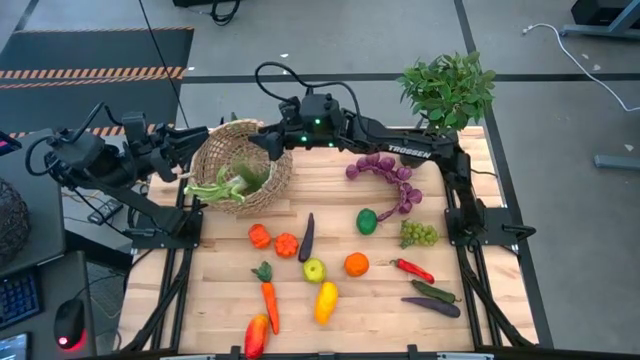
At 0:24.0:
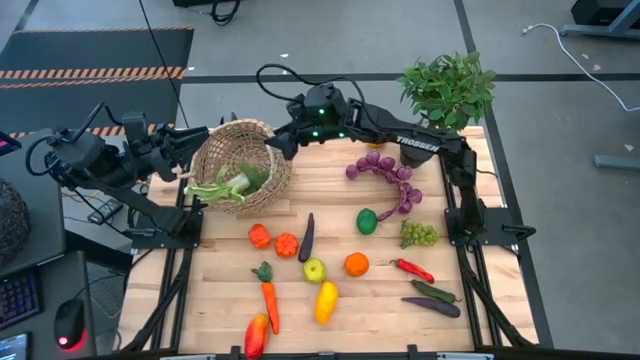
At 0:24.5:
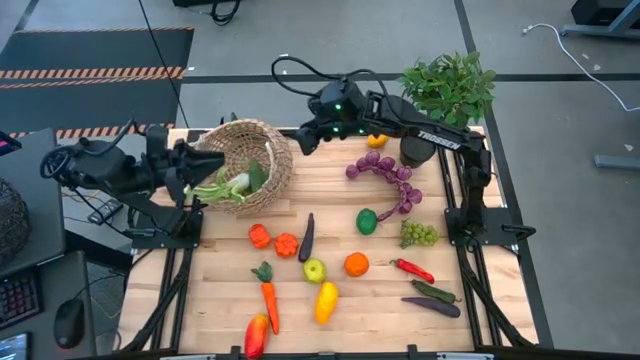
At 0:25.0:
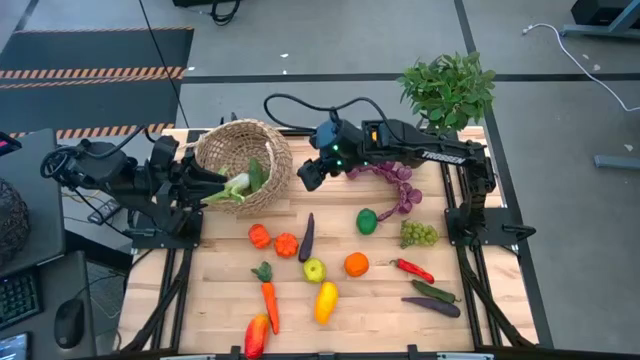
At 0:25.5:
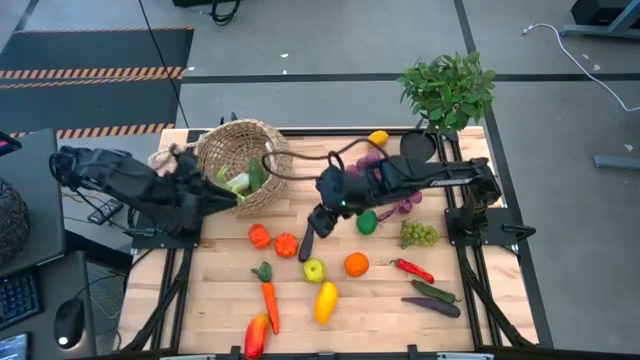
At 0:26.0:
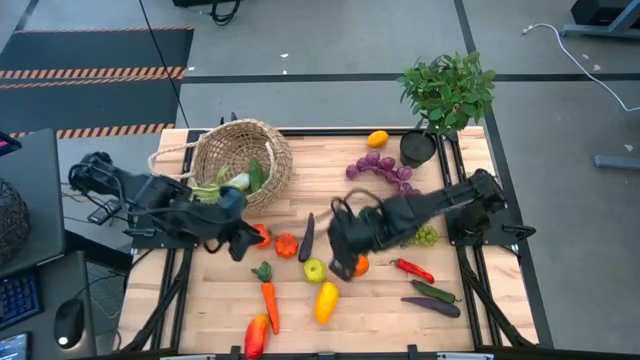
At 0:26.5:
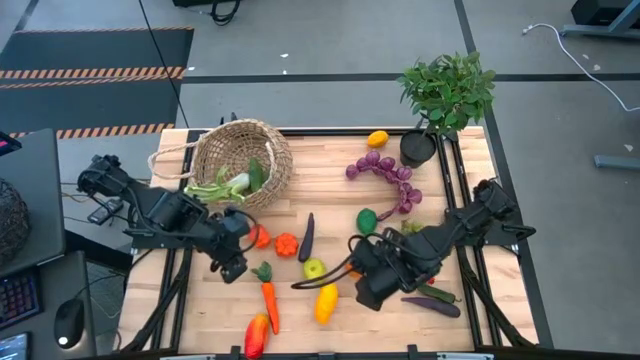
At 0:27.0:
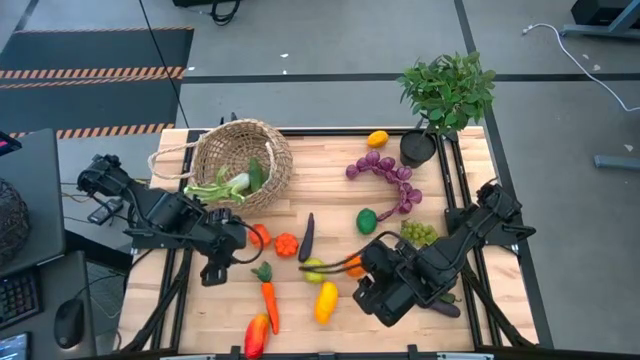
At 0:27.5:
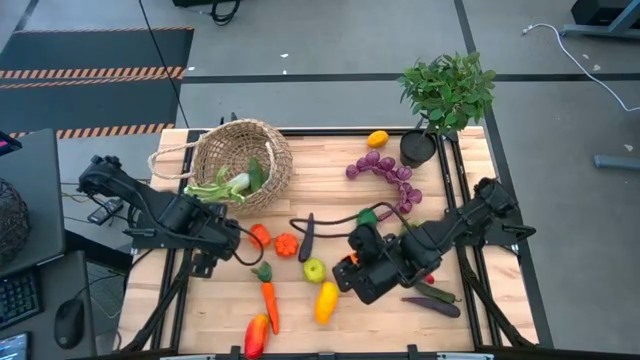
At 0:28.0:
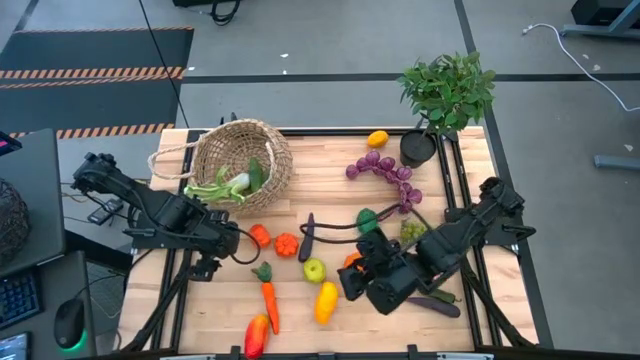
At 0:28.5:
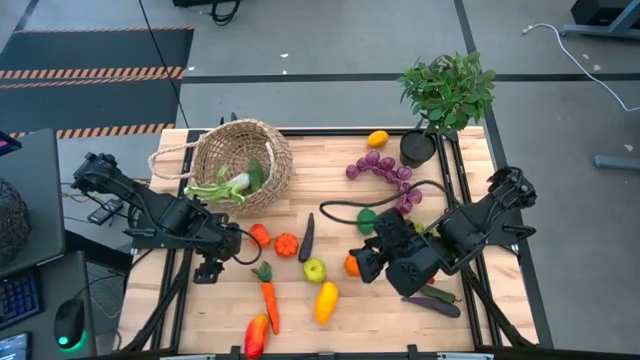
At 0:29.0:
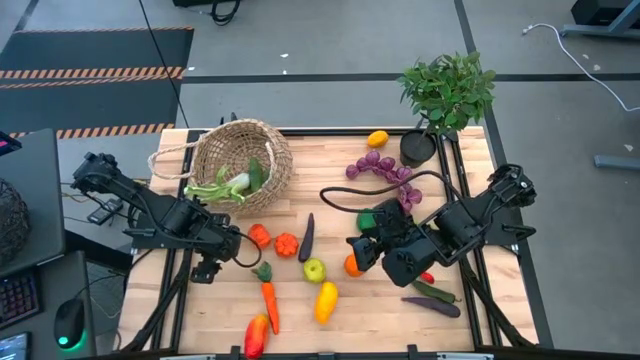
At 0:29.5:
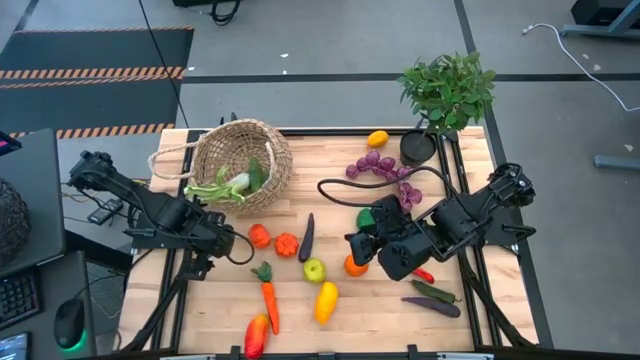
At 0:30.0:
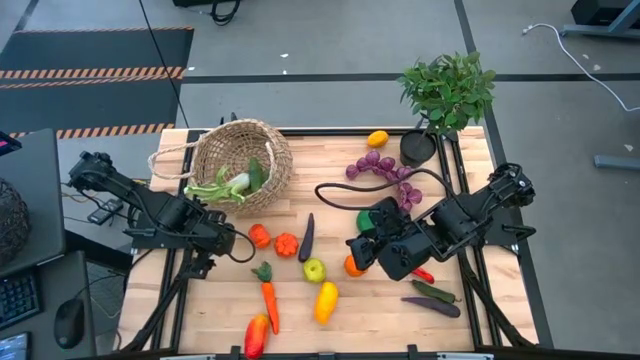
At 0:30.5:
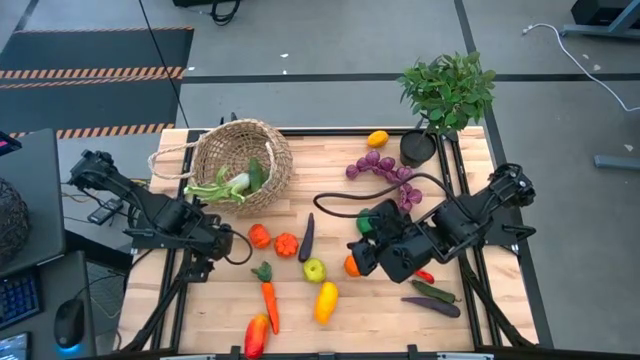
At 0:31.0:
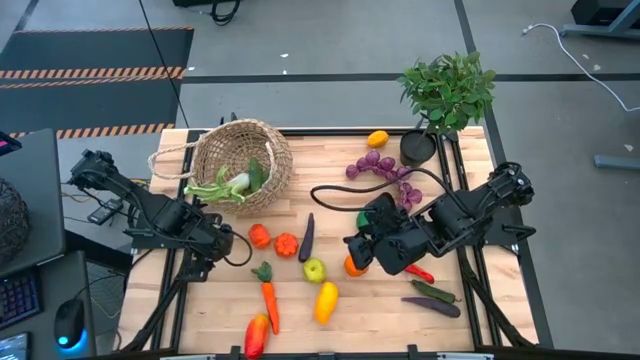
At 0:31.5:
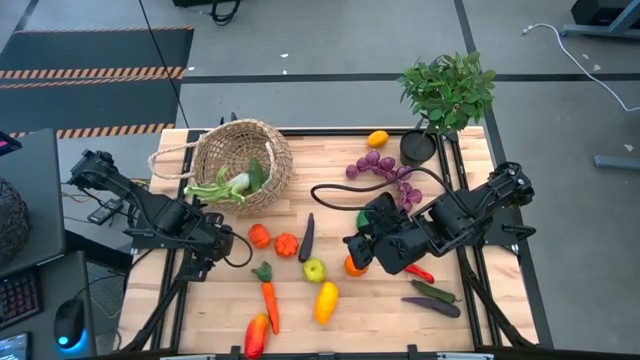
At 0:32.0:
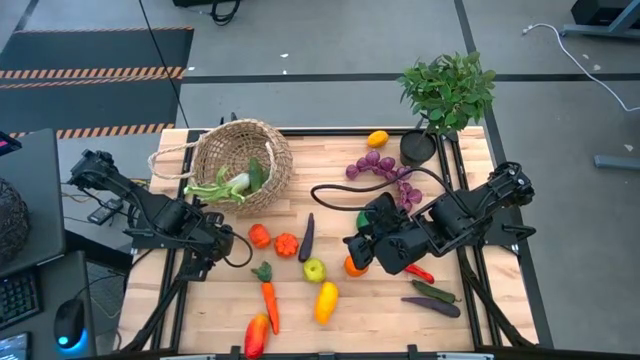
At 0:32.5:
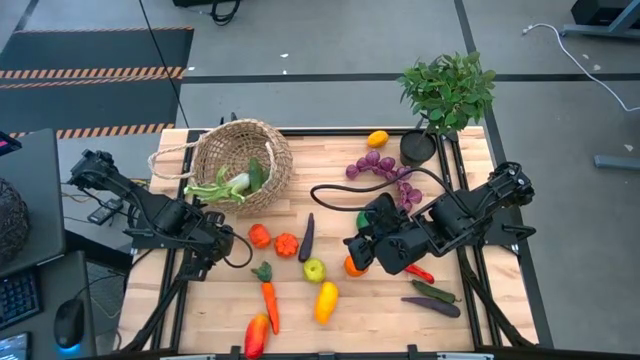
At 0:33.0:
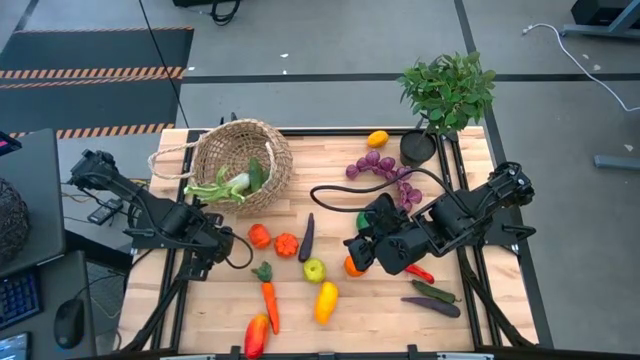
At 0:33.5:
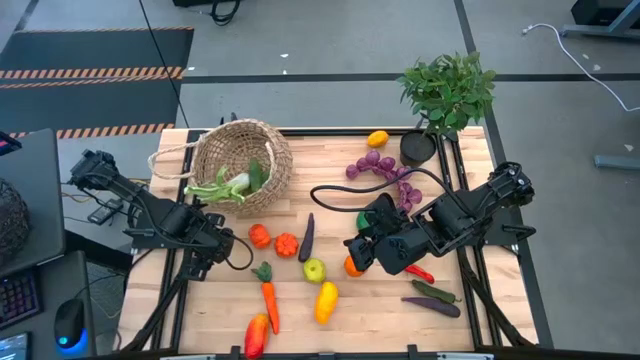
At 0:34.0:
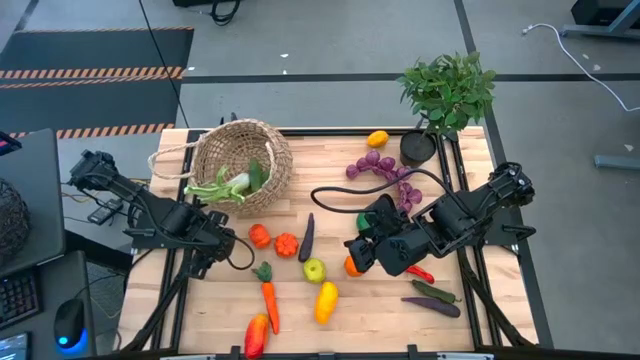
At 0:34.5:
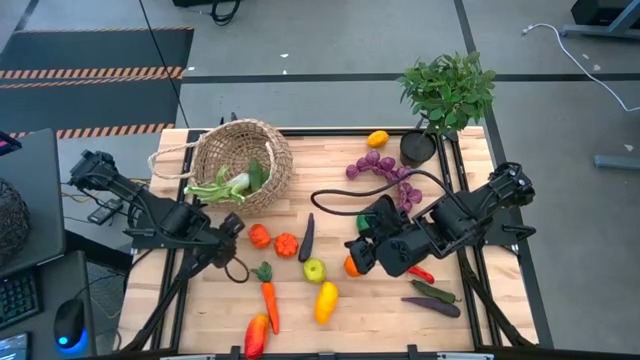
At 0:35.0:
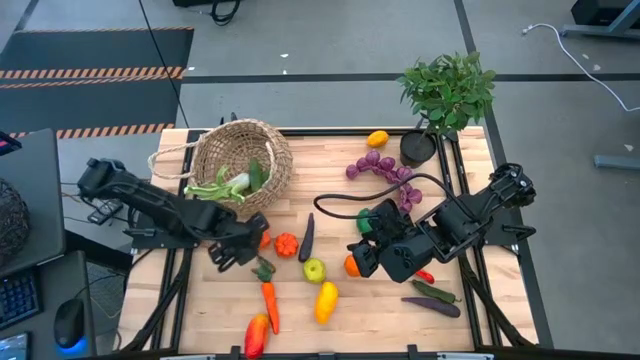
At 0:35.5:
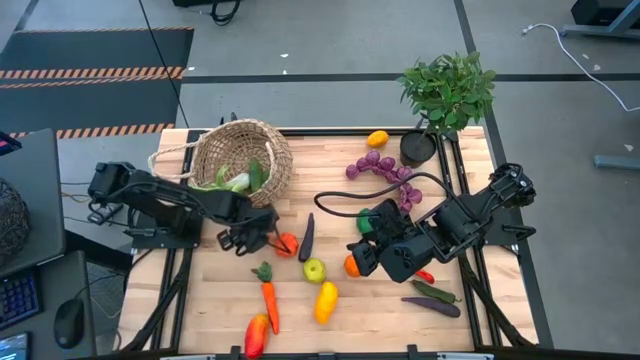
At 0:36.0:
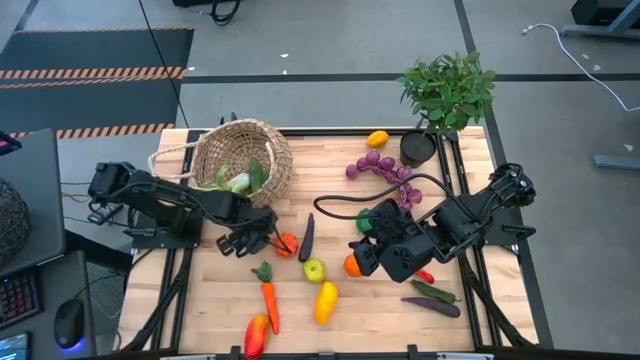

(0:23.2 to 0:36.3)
Task: Build produce basket
Put the left orange pumpkin into the brown basket

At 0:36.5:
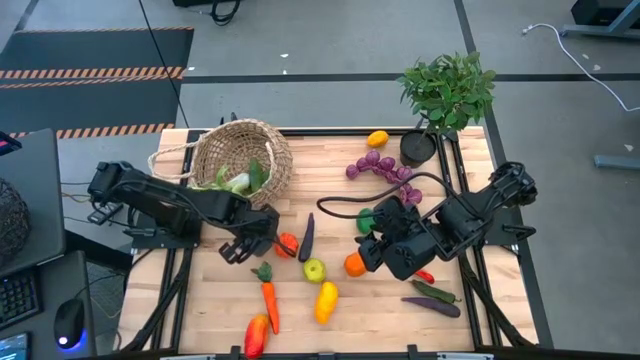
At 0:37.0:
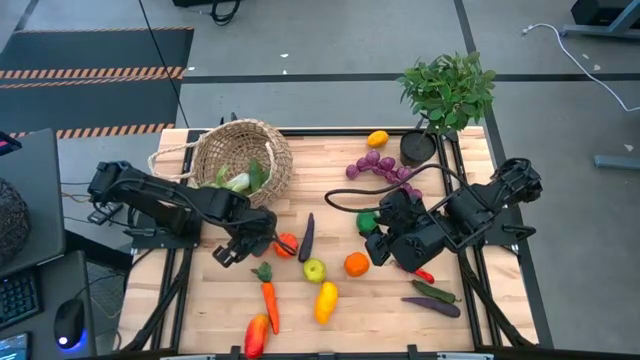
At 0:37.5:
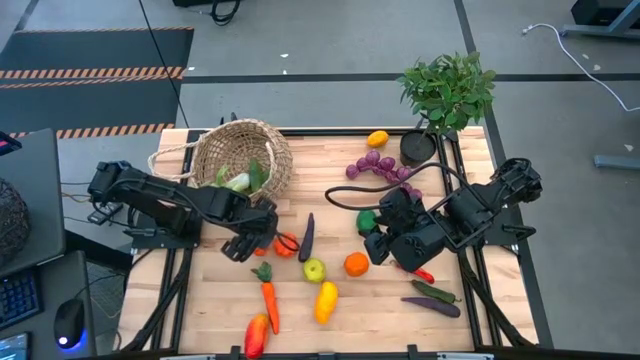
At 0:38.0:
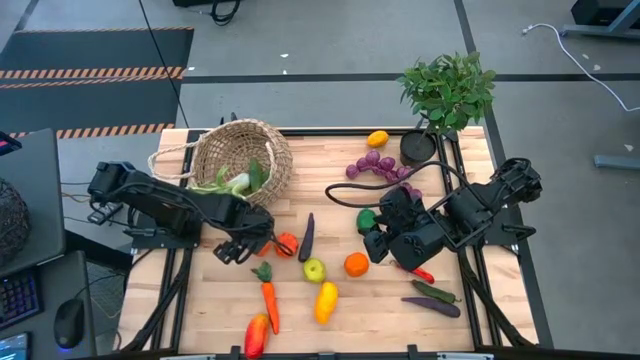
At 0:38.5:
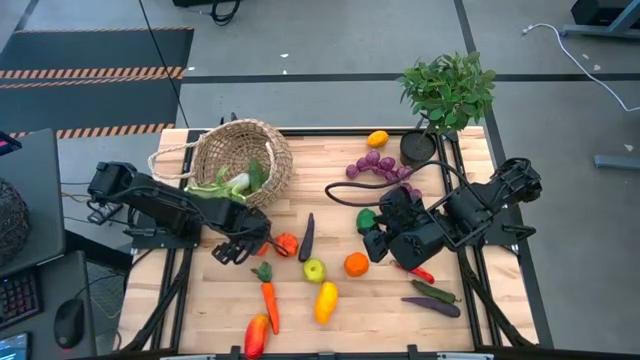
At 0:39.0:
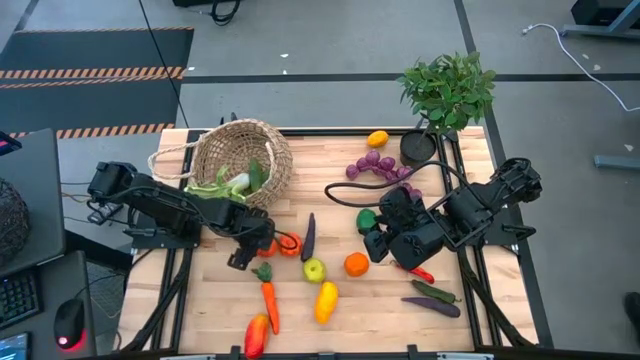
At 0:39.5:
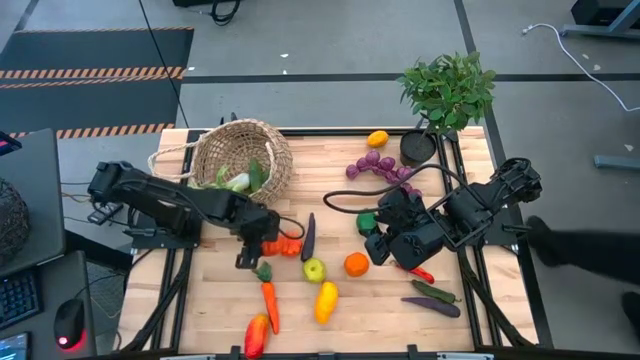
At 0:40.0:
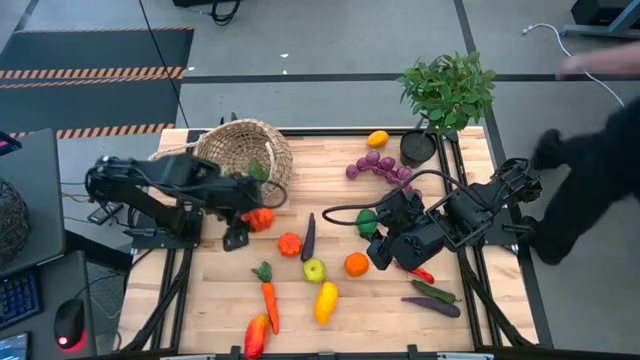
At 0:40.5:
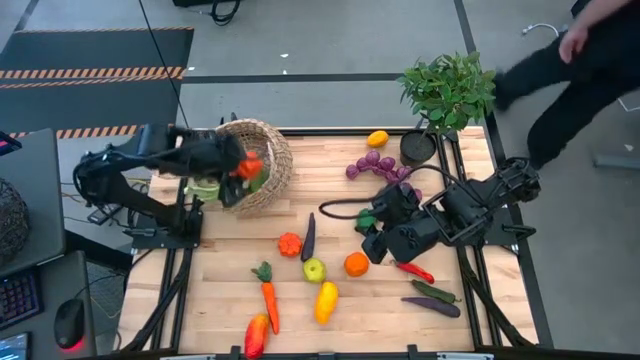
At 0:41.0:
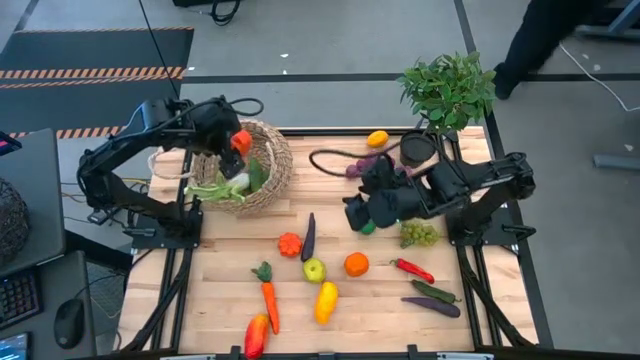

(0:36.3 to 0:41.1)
Put the left orange pumpkin into the brown basket

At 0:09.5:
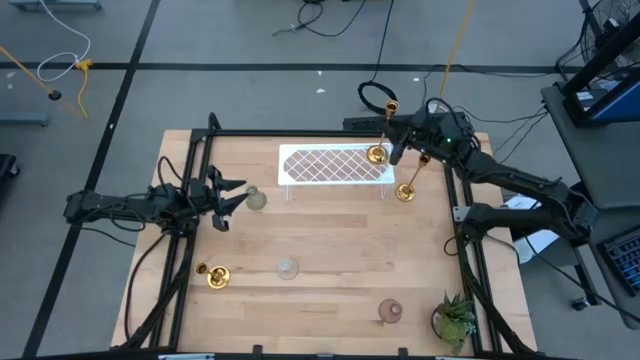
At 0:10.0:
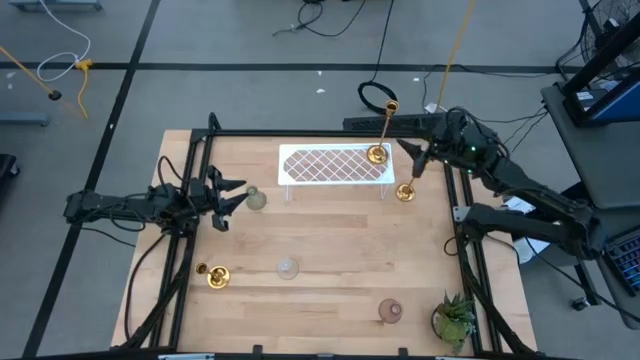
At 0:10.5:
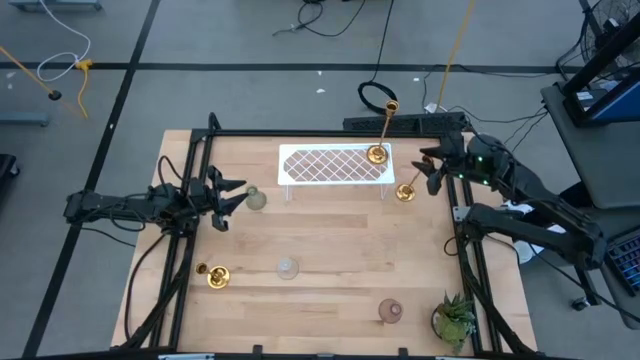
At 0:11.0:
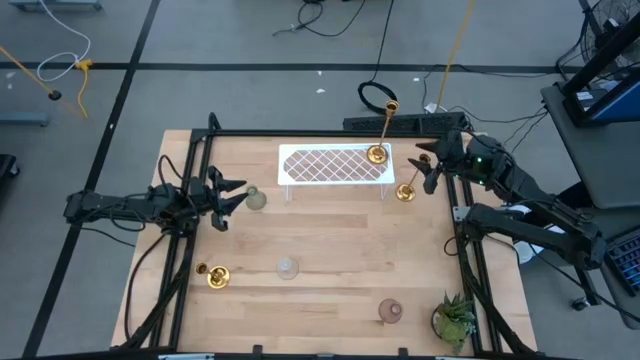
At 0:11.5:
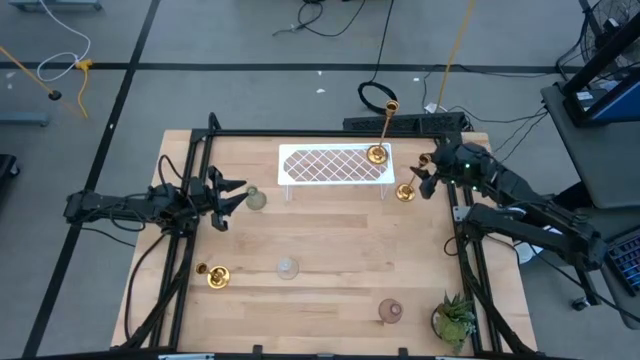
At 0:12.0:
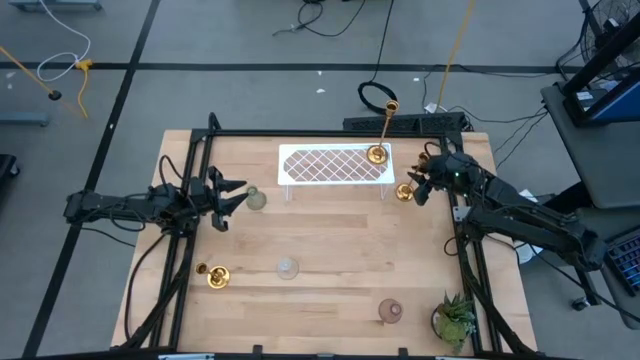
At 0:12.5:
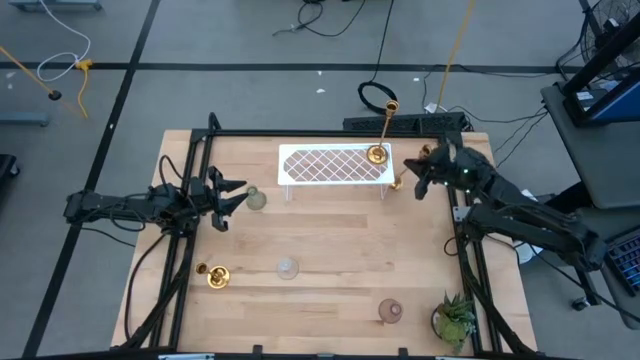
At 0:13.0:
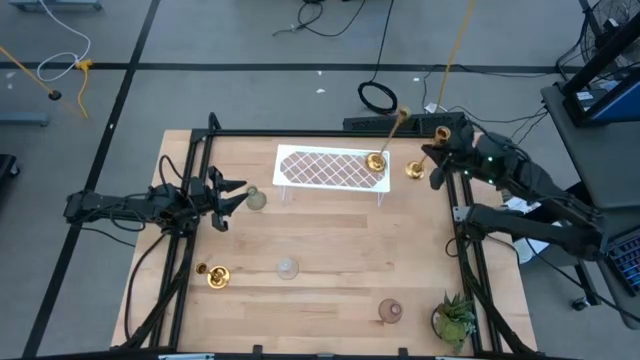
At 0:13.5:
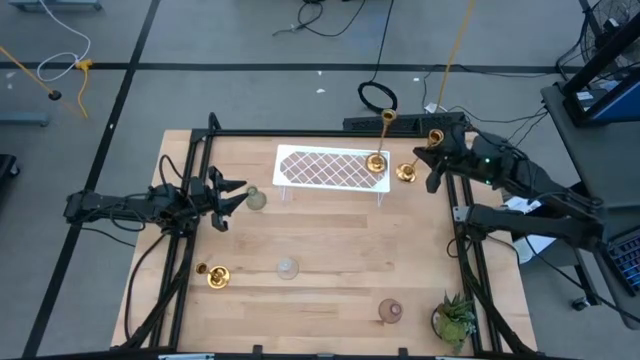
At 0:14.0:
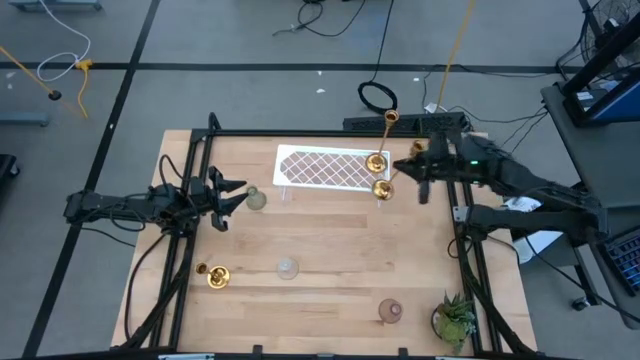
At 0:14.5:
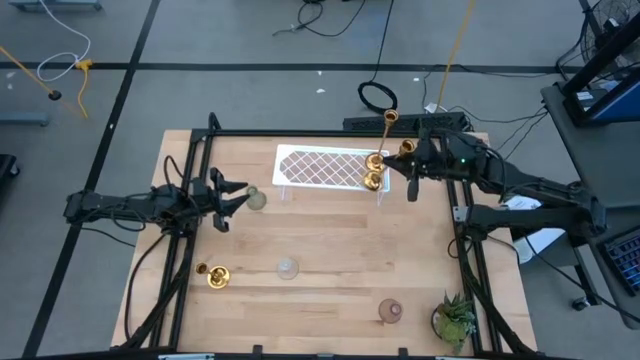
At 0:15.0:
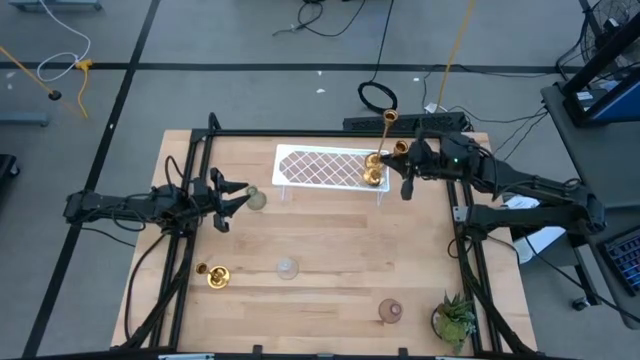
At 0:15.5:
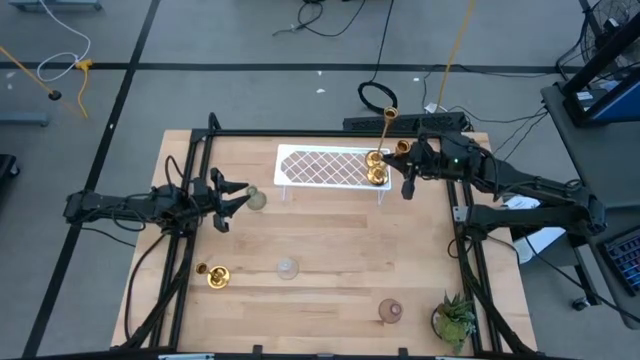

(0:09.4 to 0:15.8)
Task: Pick & Place candle stick holders
Put the right gold candle holder on the shelf
